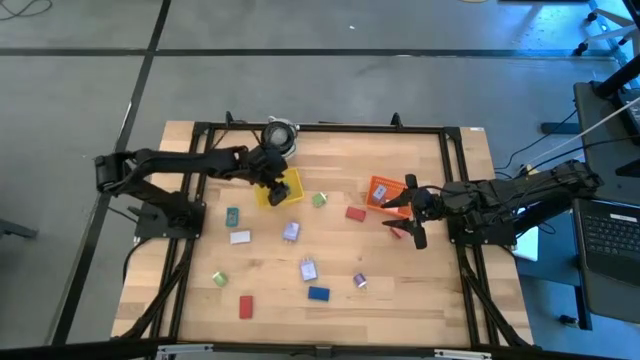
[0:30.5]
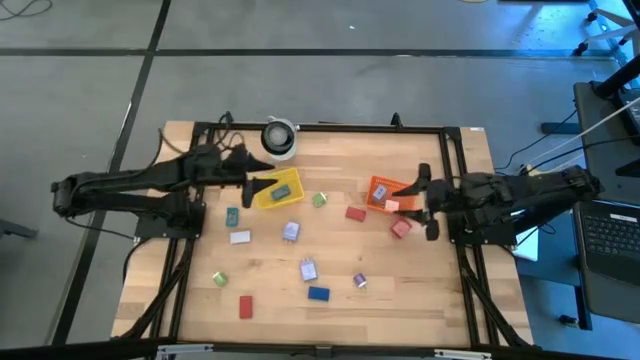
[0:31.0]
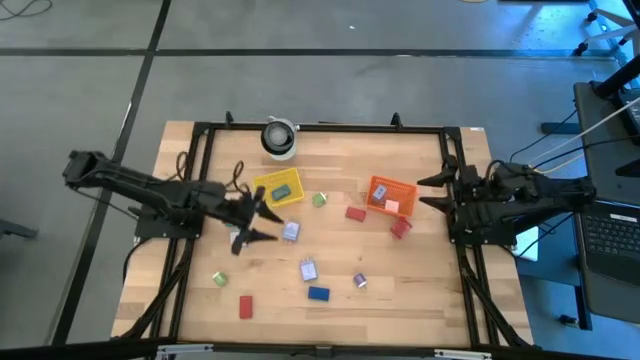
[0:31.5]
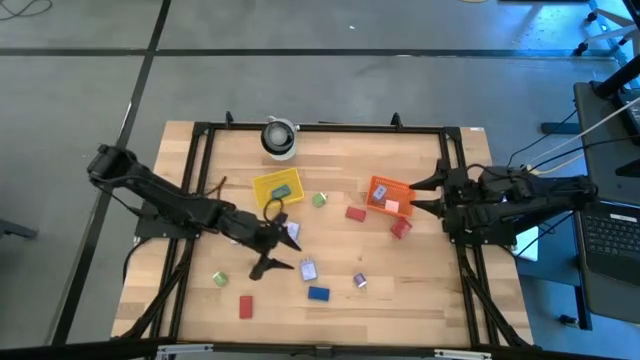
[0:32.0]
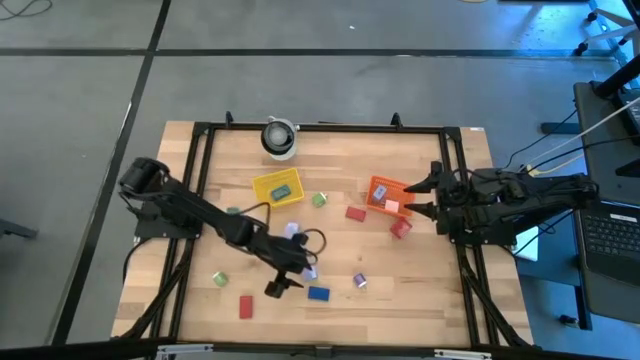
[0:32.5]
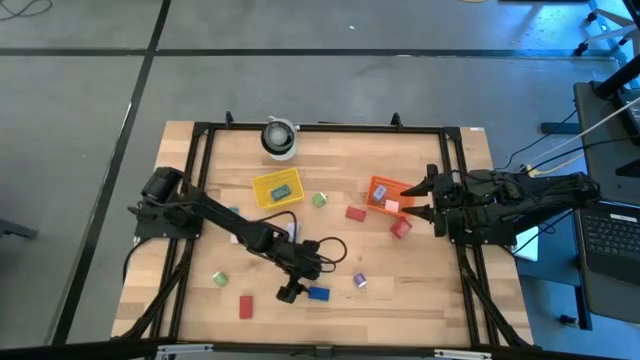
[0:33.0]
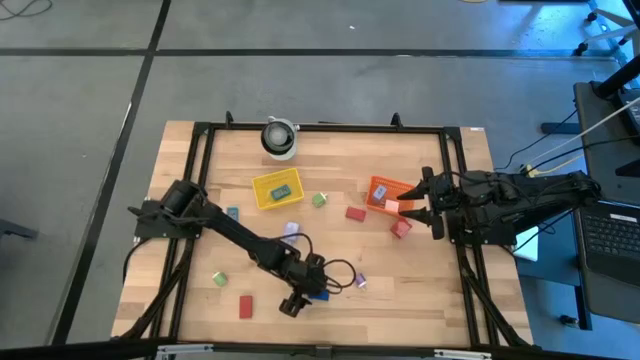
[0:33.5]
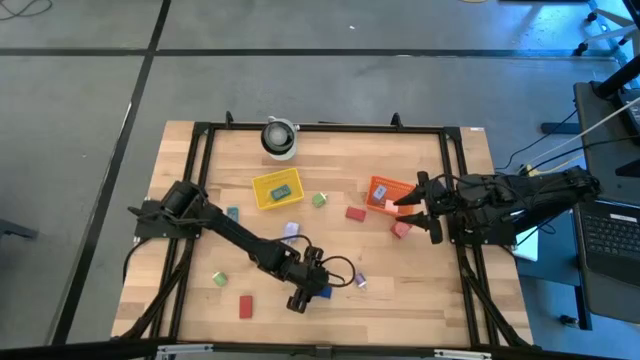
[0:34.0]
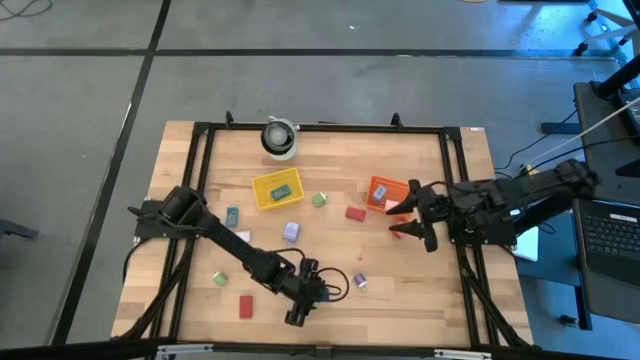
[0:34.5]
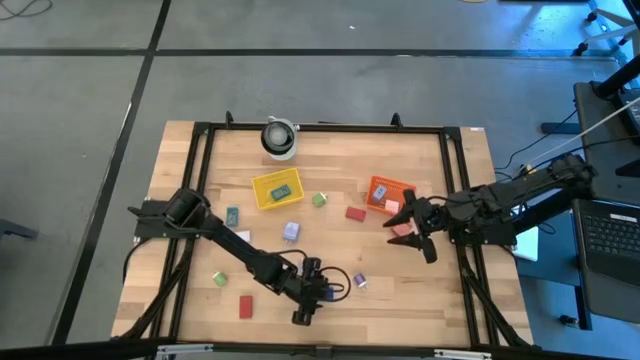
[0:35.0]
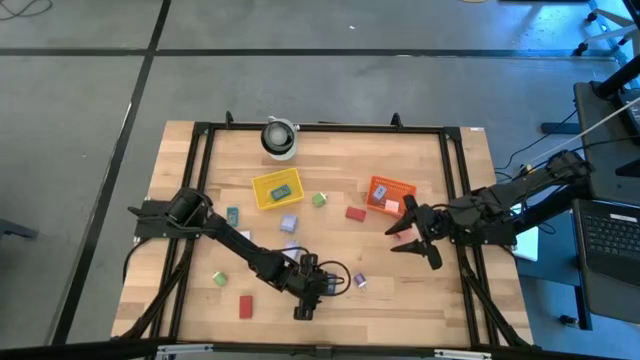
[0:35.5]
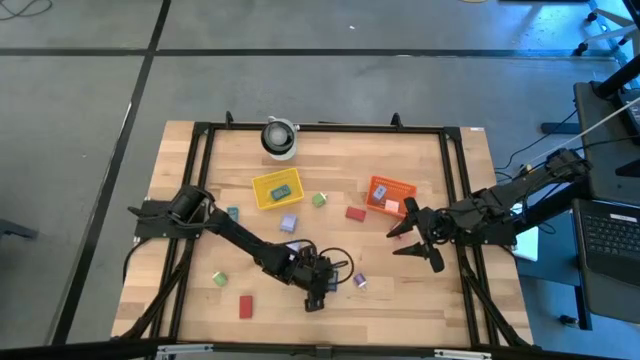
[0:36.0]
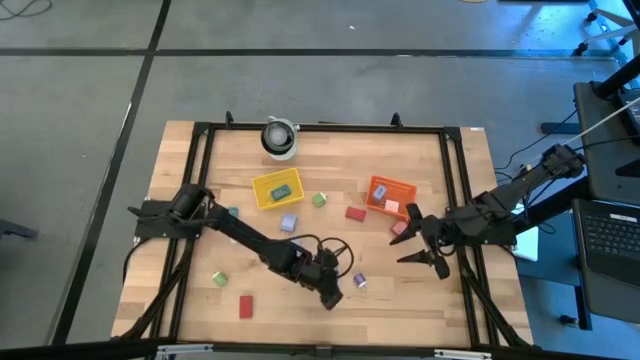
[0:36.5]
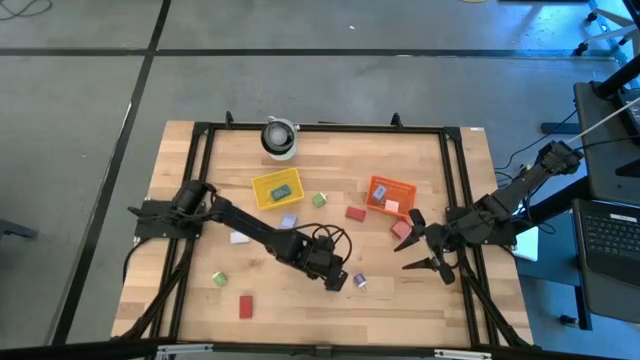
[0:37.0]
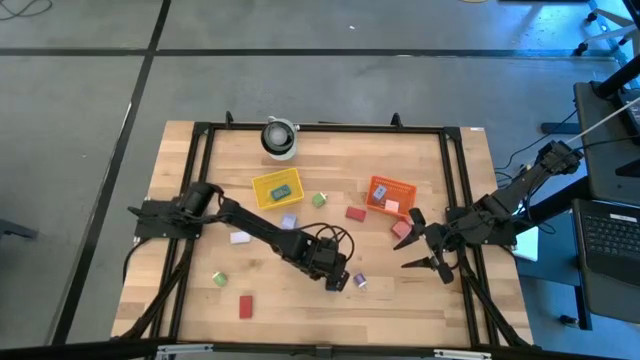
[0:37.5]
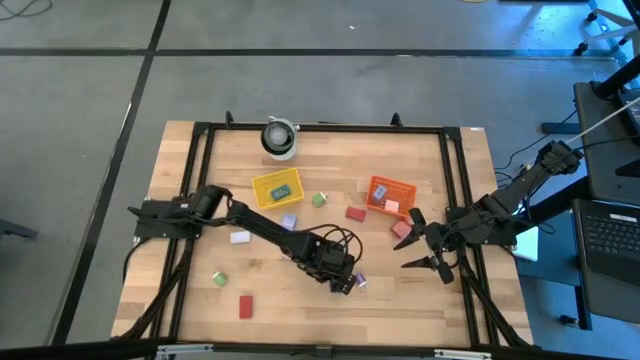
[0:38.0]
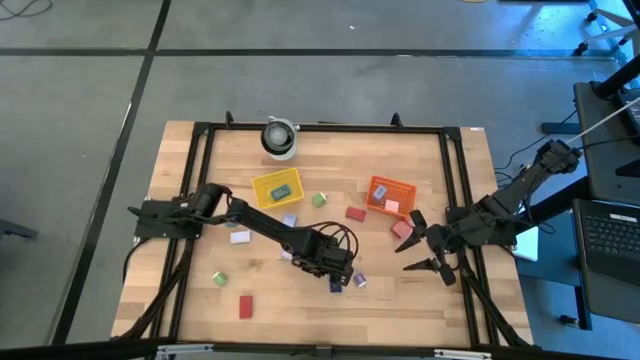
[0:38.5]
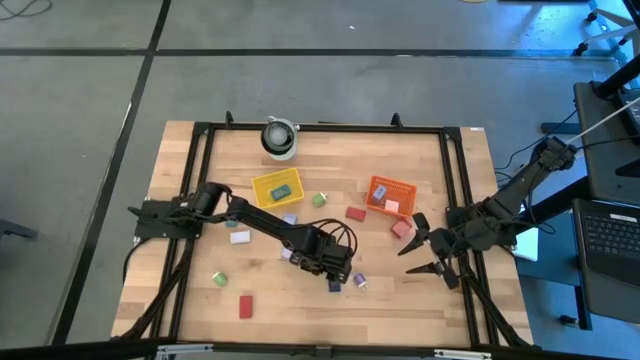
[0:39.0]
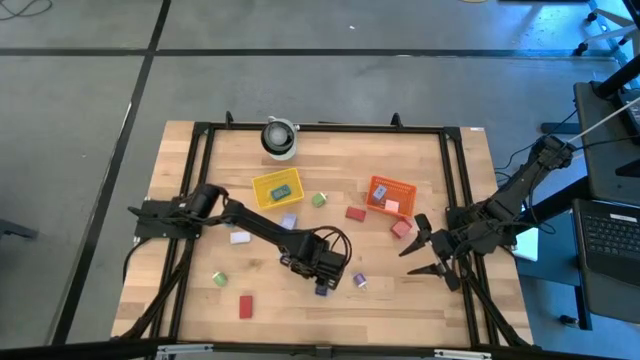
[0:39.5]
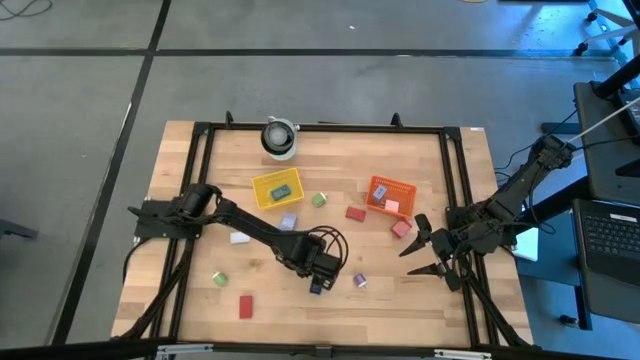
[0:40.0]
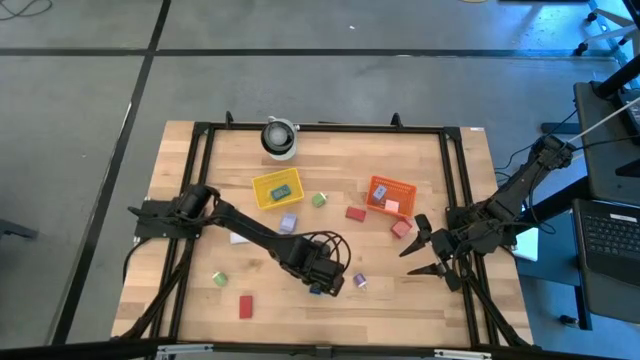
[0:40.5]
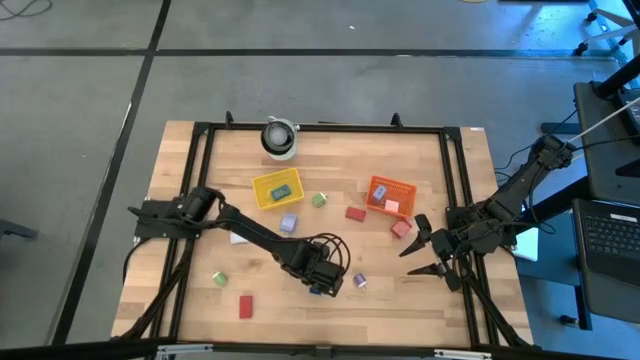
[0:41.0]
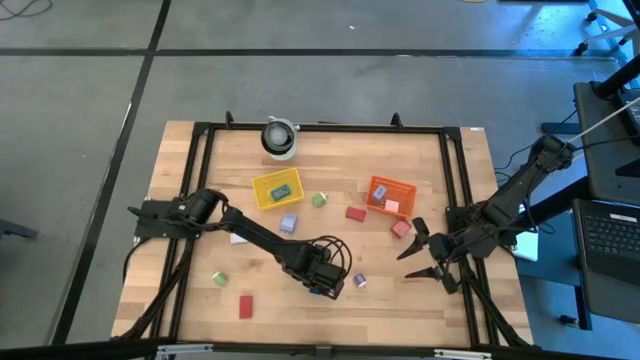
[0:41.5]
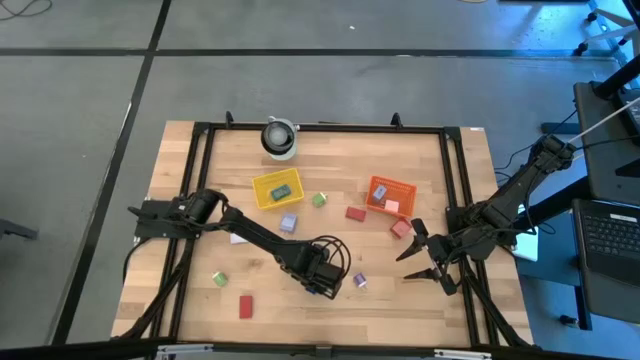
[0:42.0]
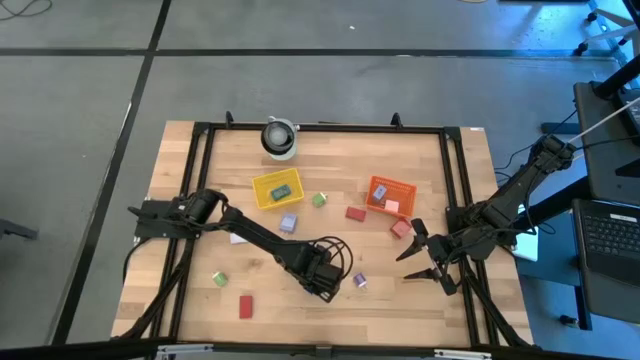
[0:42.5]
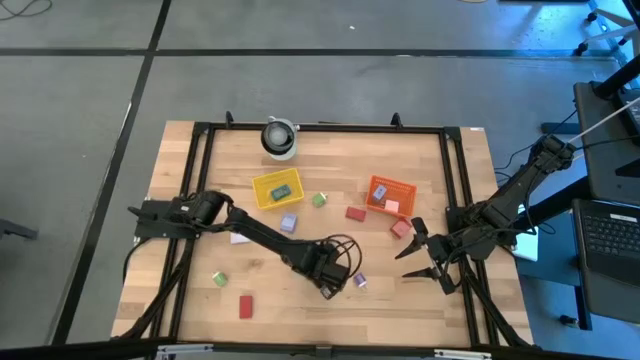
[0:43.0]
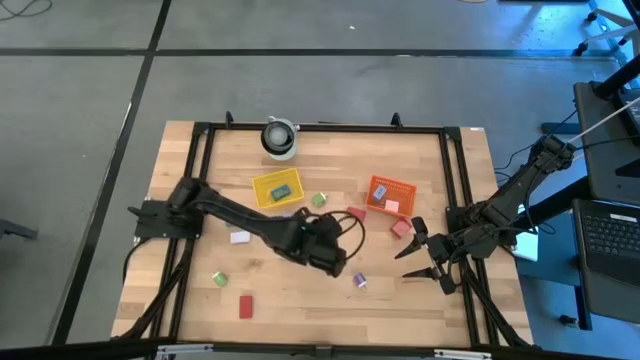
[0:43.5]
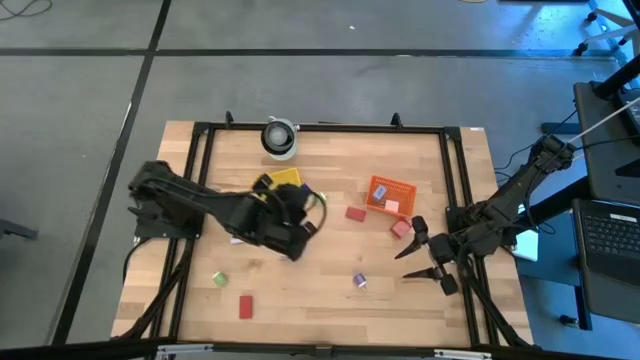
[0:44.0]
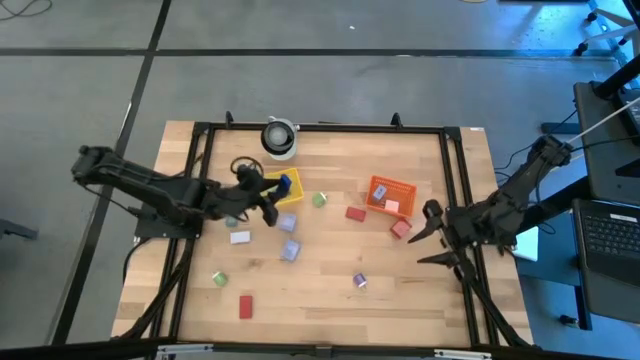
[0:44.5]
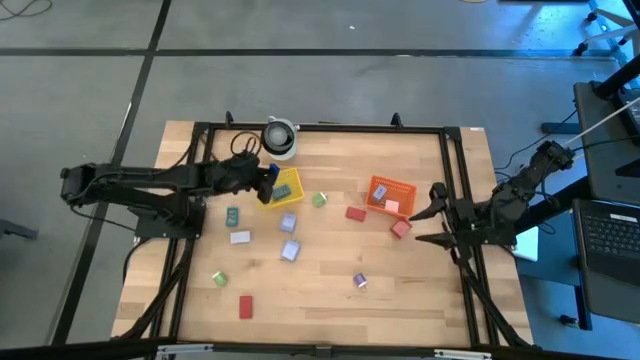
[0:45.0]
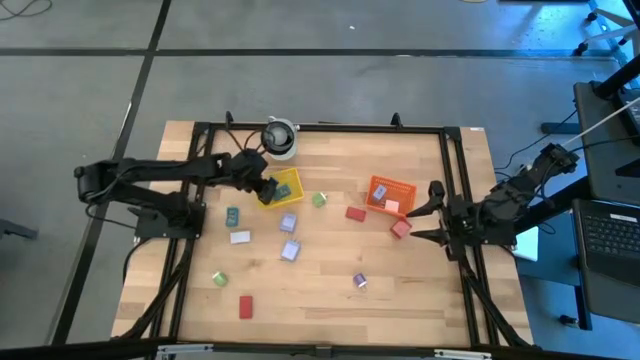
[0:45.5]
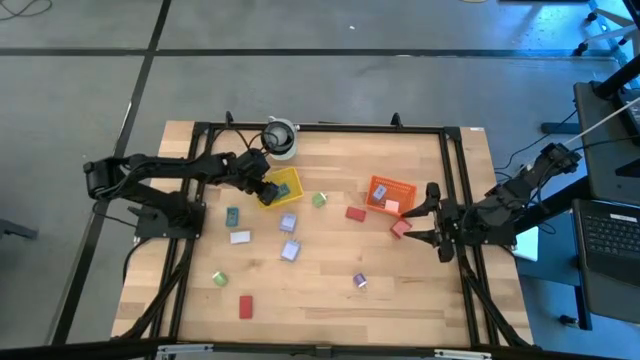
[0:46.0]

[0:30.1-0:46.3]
Task: Pick & Place Office items
Put the blue digital clock into the yellow bin
